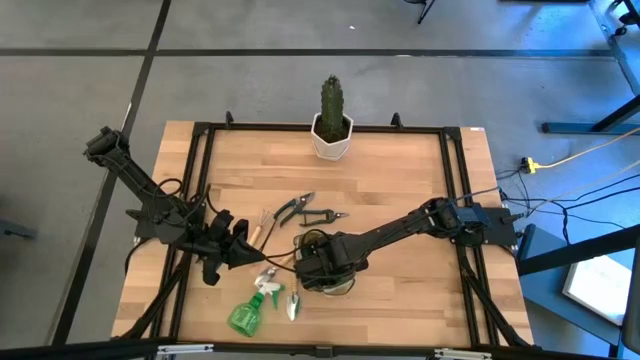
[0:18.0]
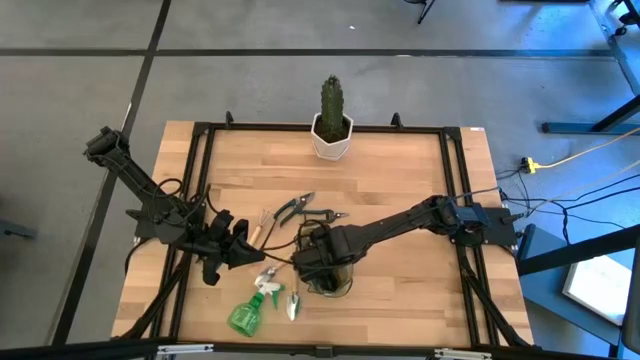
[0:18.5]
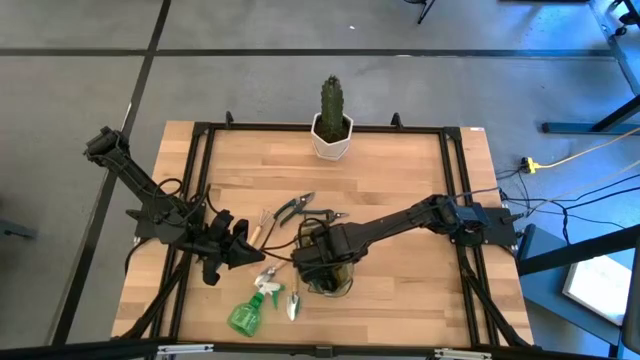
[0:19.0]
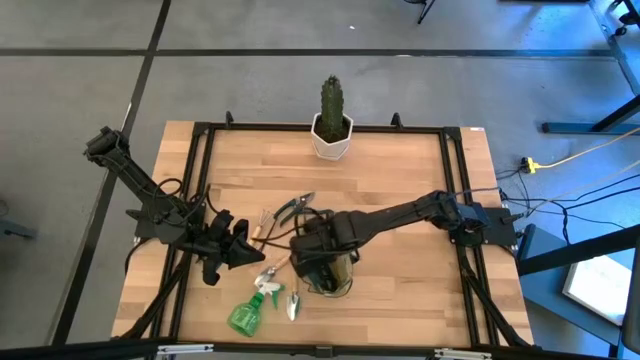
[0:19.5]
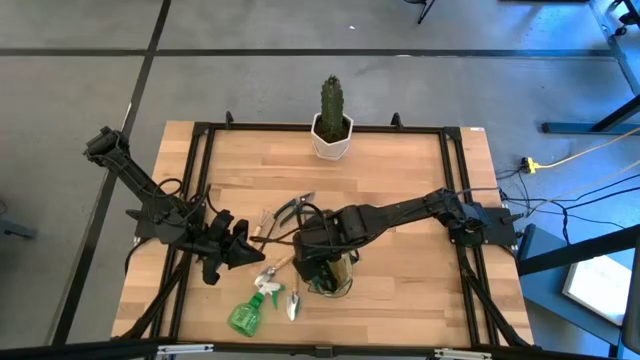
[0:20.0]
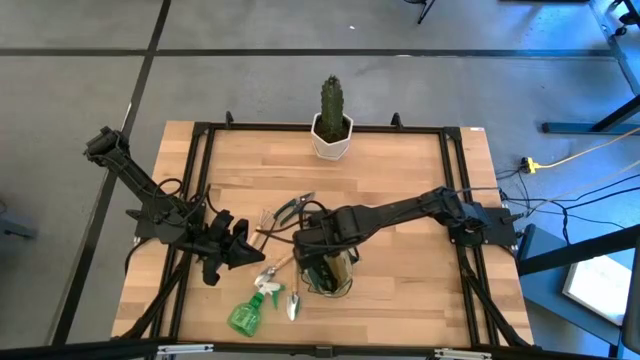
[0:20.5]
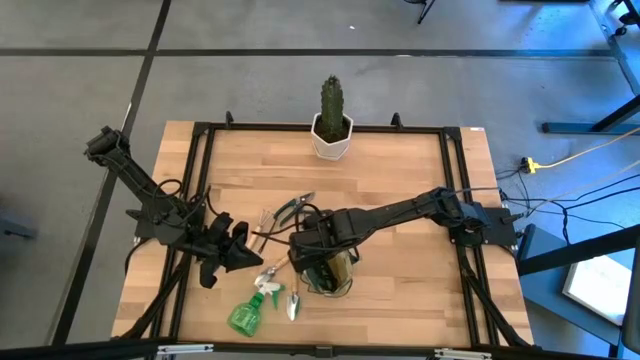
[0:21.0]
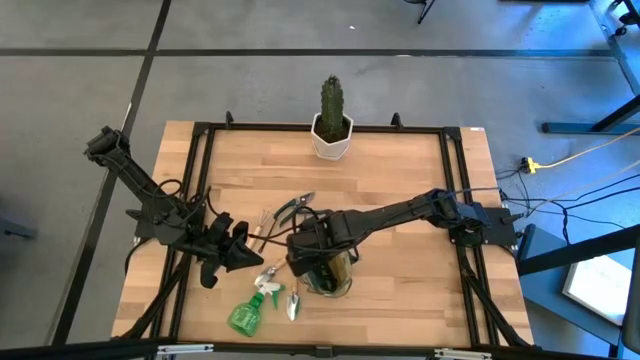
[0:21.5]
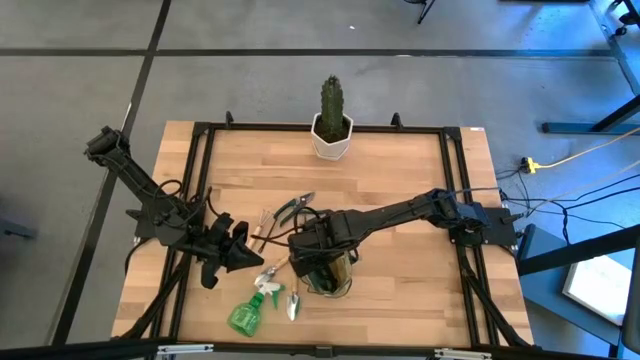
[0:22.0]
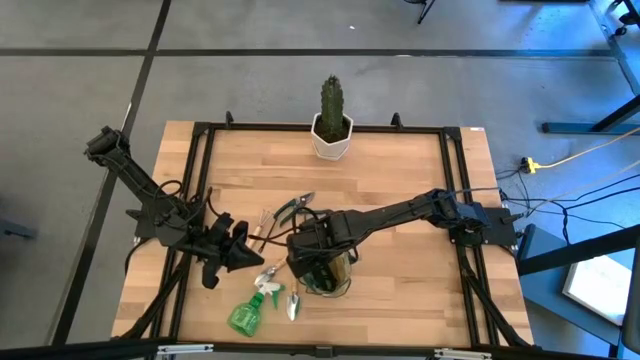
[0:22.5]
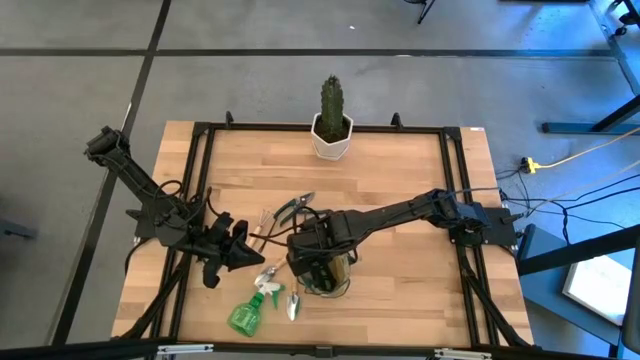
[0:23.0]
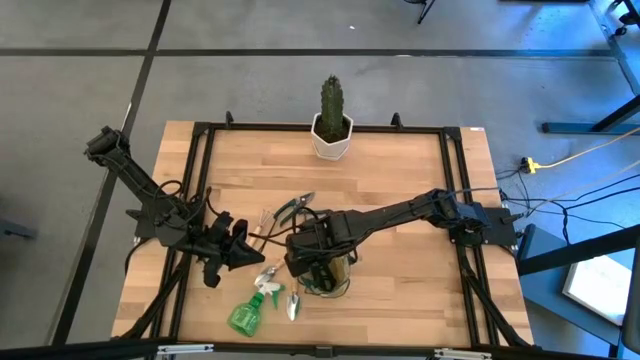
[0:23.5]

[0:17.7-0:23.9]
Task: Pick & Place Garden tools in Gardening bag
Adjust the green gardening bag

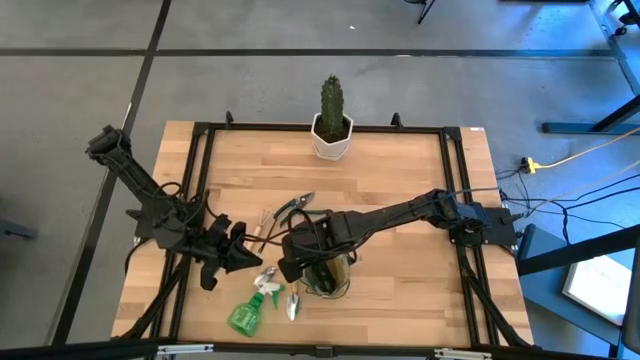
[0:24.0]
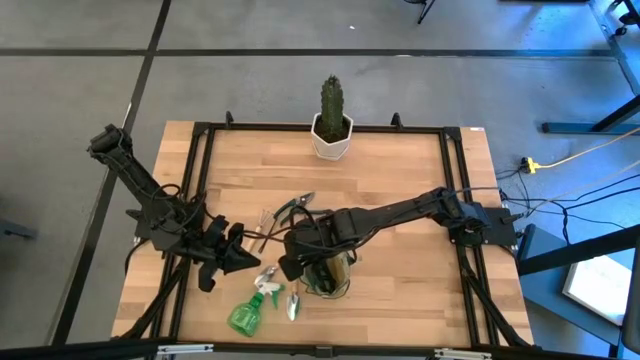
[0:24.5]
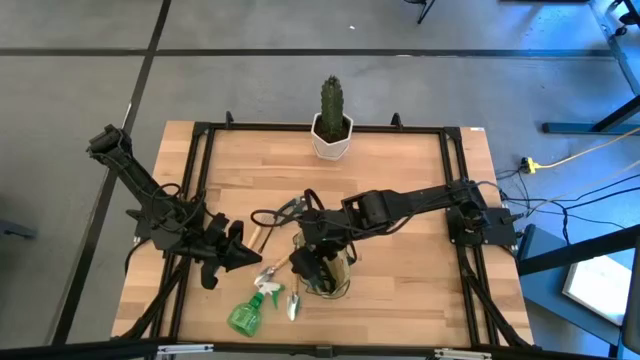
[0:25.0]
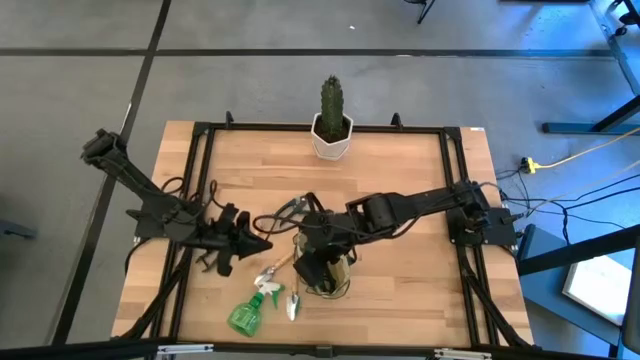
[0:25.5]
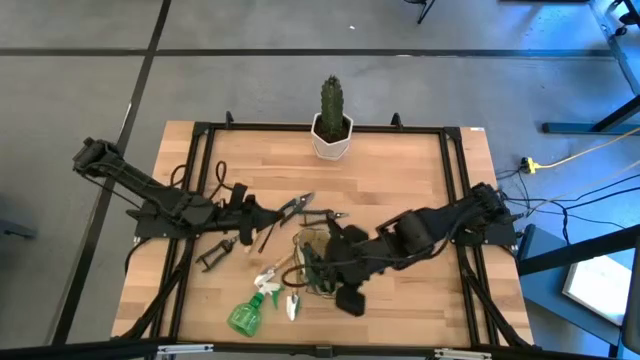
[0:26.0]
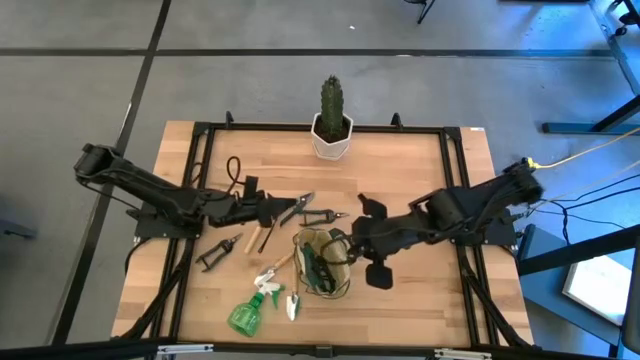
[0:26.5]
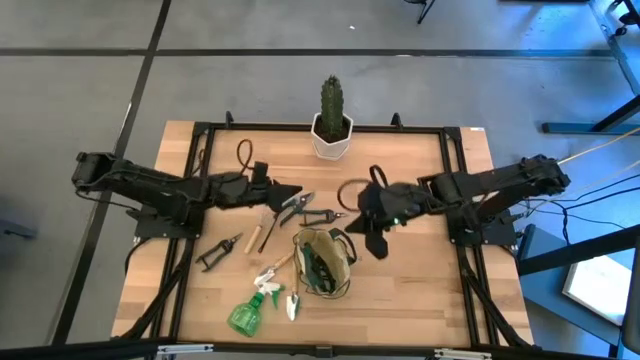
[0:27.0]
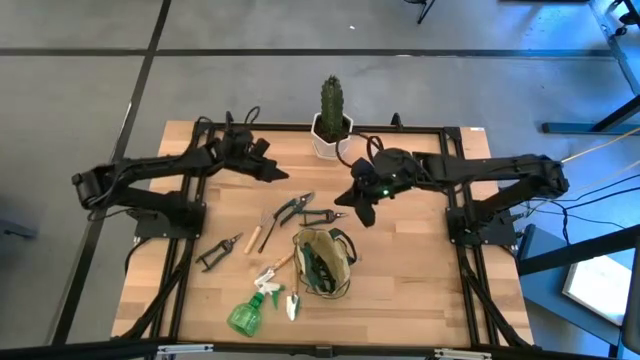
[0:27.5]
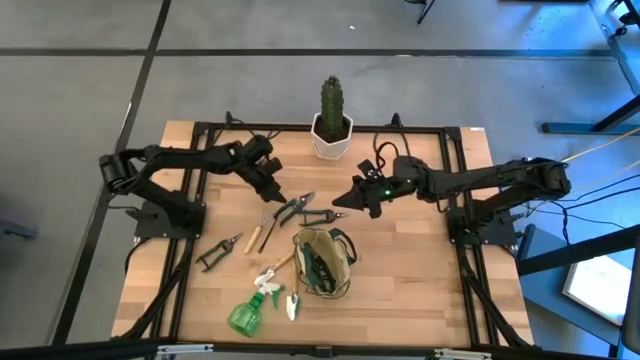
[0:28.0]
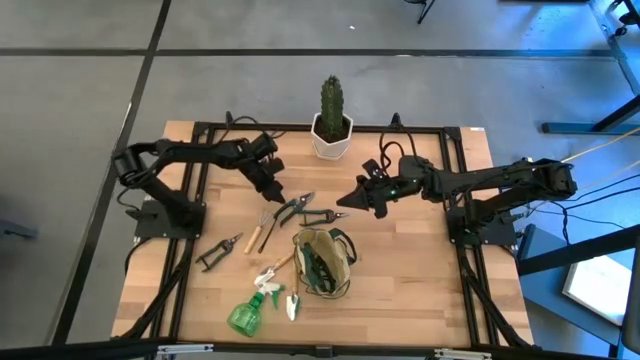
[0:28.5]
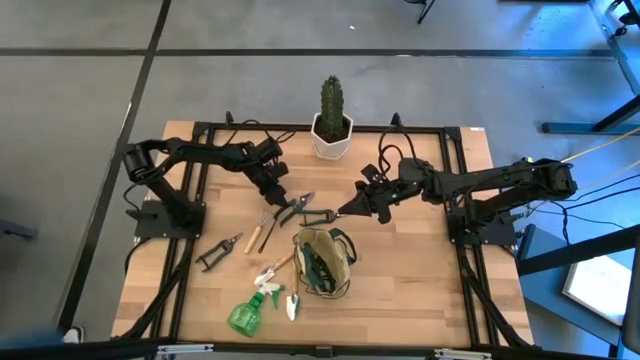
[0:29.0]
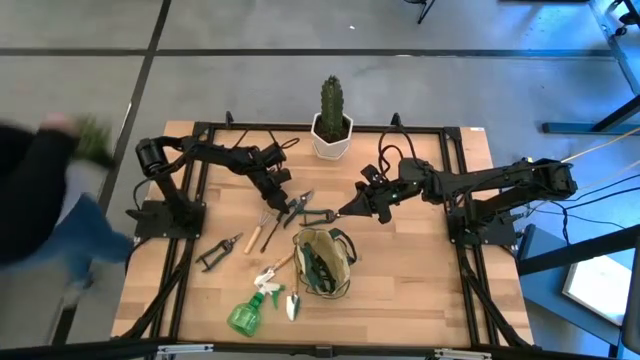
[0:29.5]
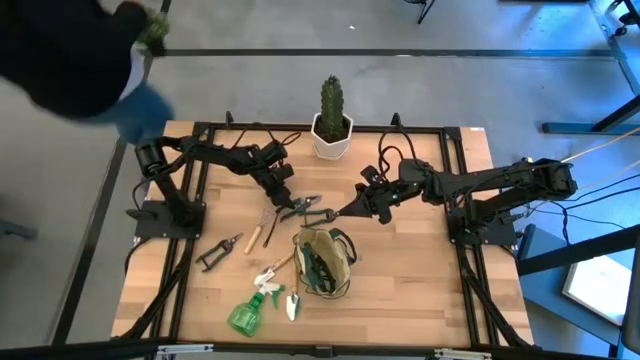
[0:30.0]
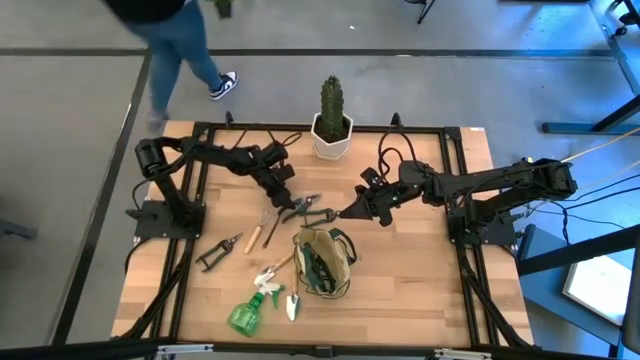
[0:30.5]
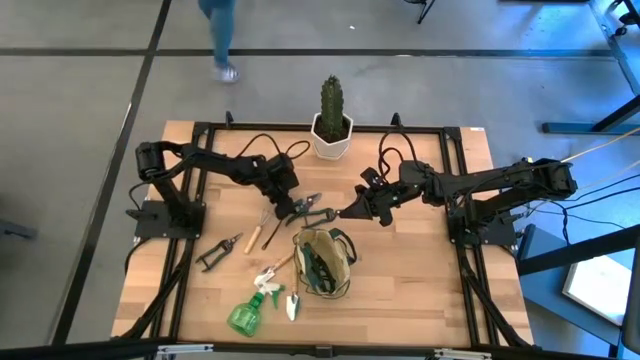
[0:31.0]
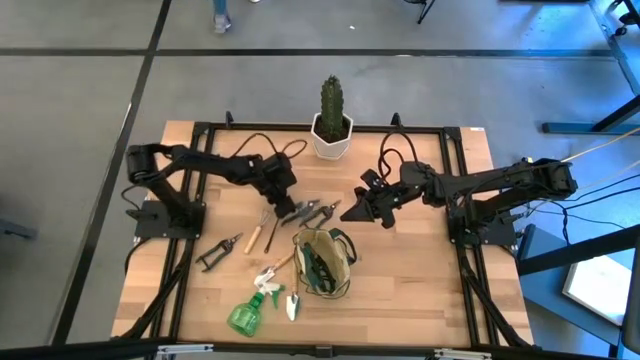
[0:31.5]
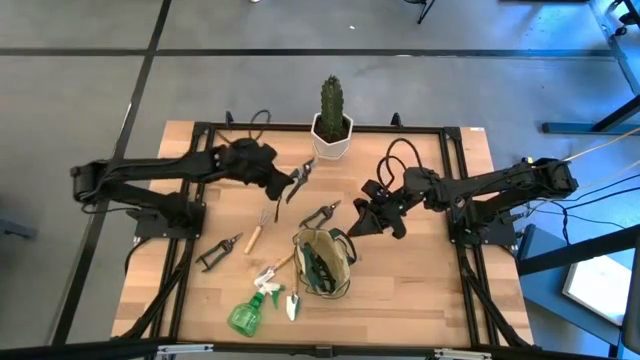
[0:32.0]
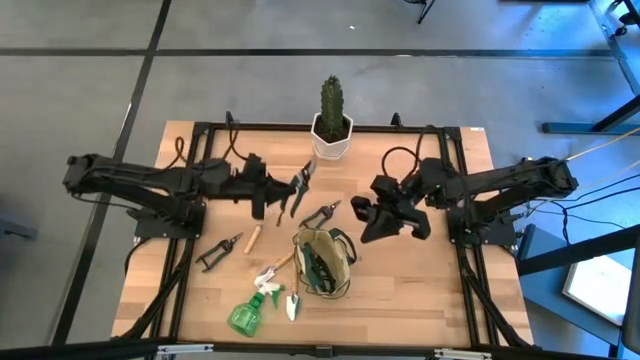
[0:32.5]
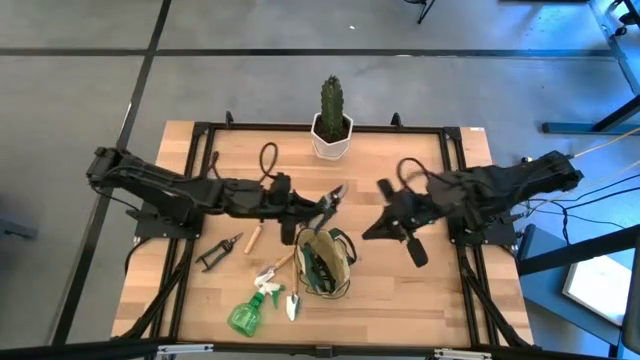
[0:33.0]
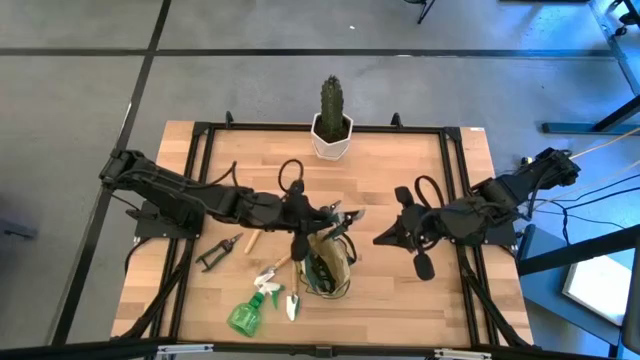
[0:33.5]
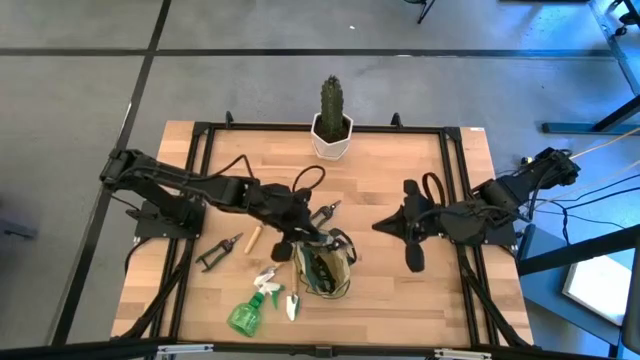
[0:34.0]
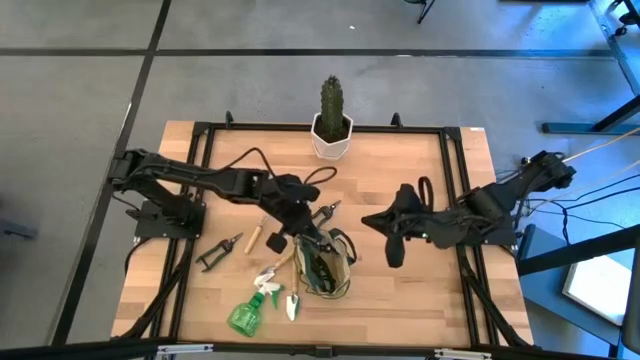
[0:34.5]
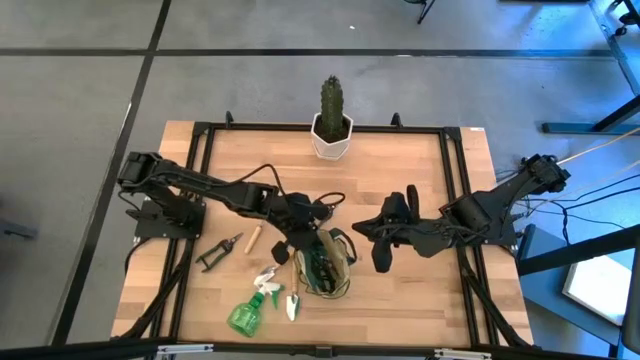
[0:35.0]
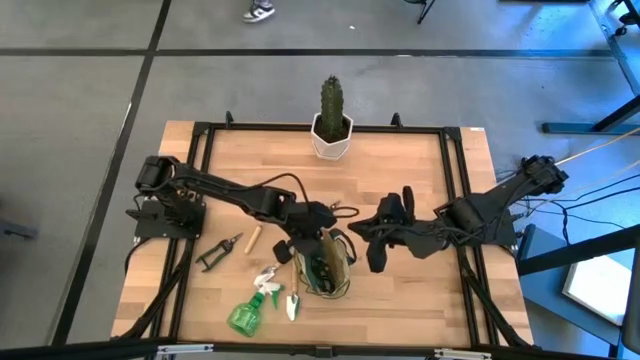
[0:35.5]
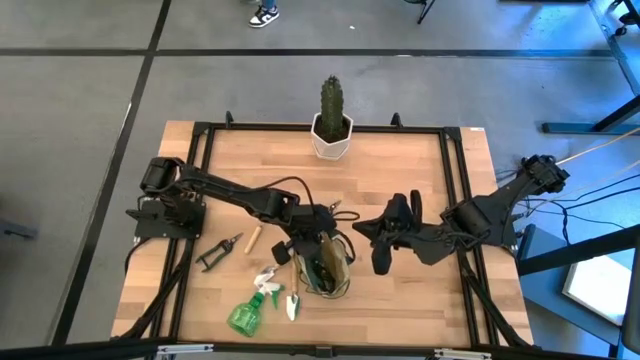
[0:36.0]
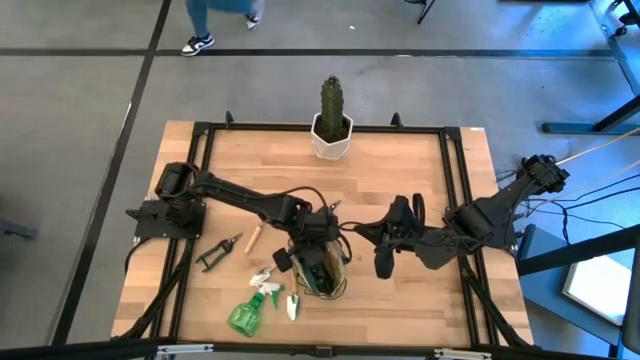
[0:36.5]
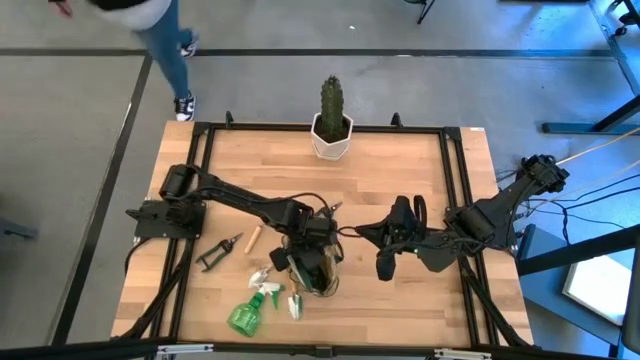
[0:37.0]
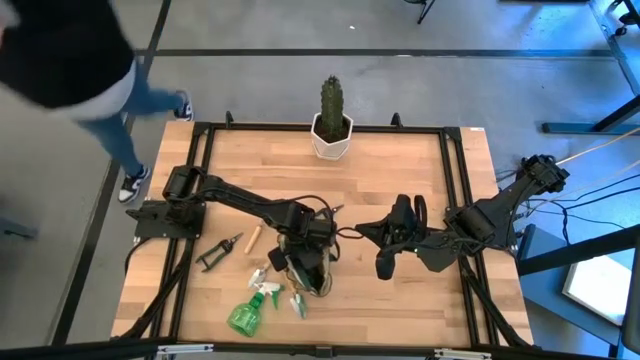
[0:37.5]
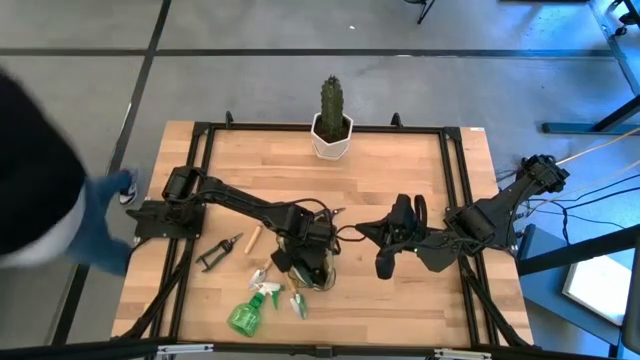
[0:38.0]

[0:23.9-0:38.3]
Put the green shears into the green gardening bag
